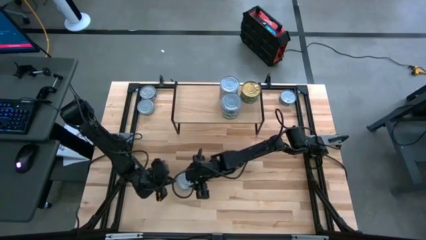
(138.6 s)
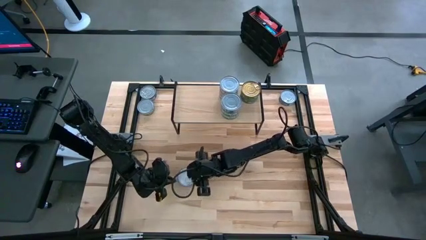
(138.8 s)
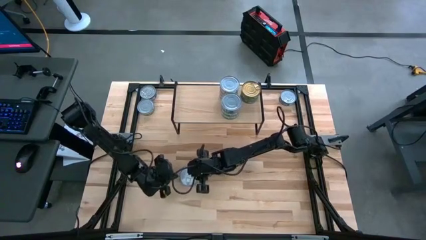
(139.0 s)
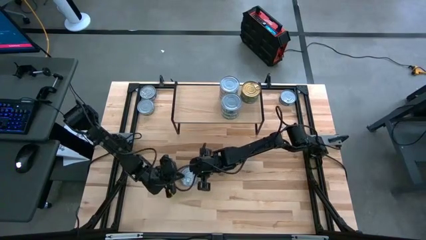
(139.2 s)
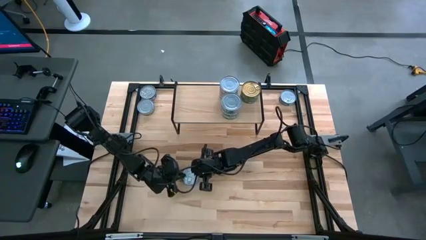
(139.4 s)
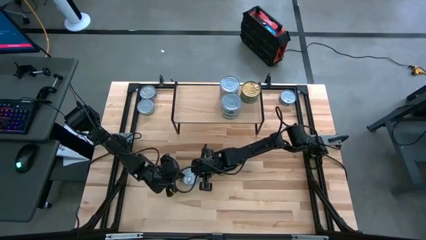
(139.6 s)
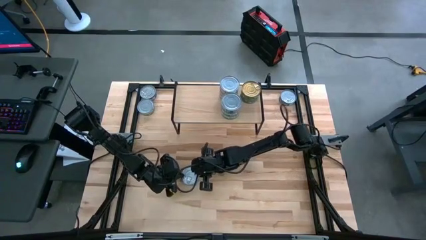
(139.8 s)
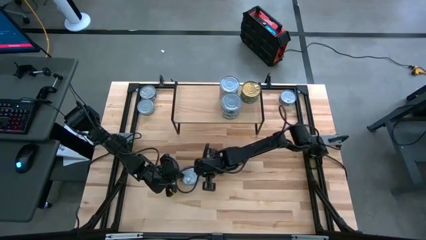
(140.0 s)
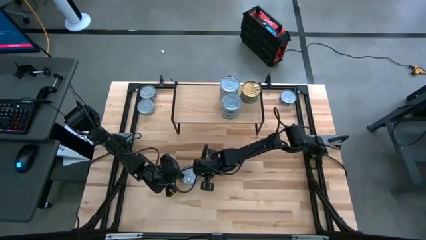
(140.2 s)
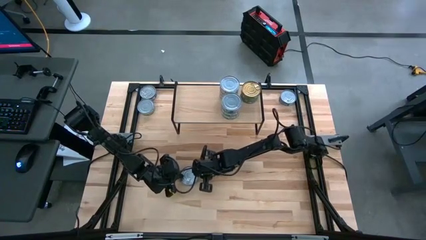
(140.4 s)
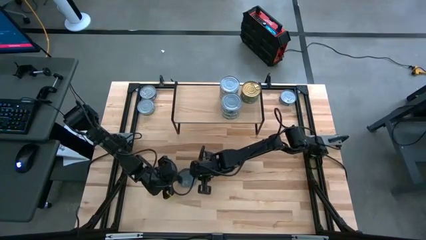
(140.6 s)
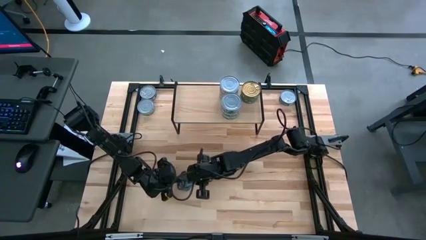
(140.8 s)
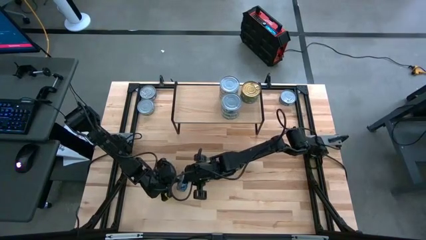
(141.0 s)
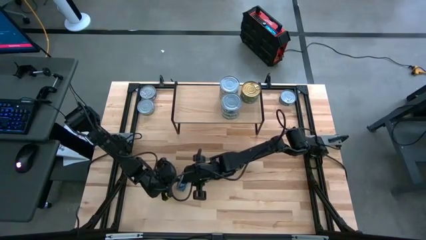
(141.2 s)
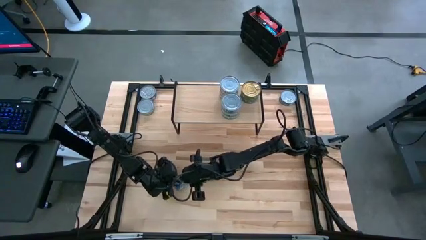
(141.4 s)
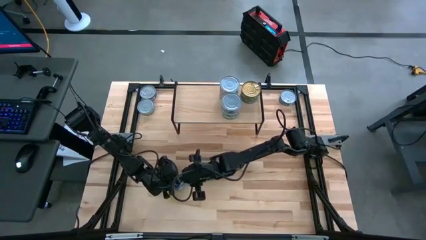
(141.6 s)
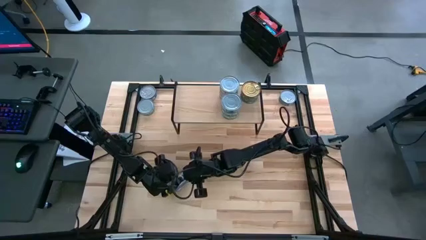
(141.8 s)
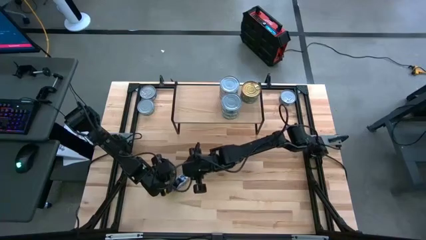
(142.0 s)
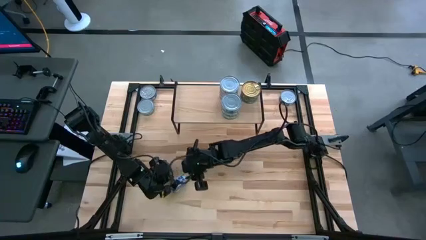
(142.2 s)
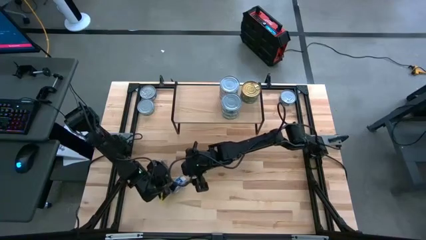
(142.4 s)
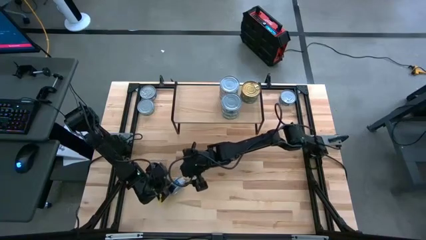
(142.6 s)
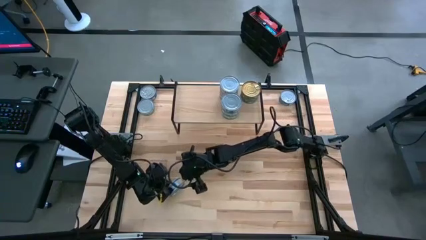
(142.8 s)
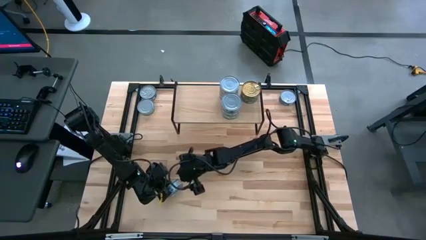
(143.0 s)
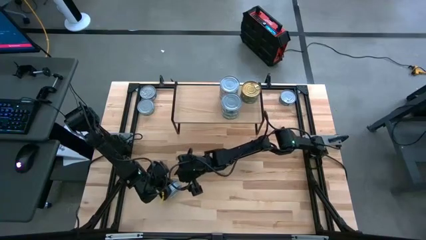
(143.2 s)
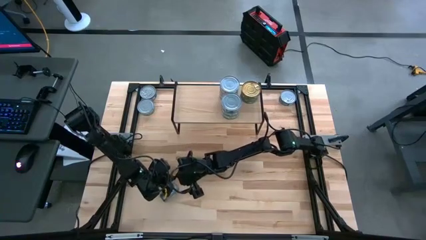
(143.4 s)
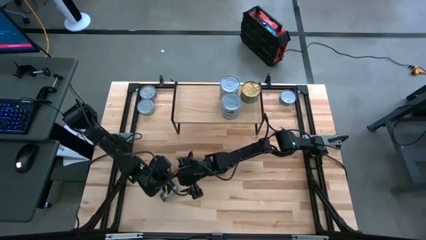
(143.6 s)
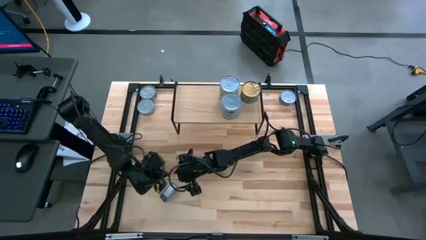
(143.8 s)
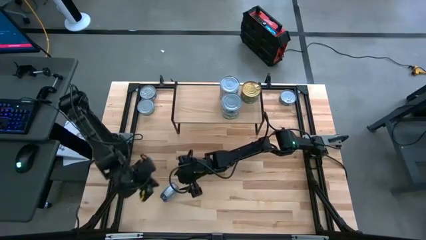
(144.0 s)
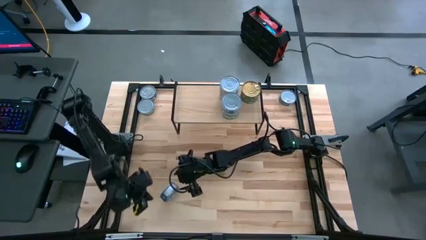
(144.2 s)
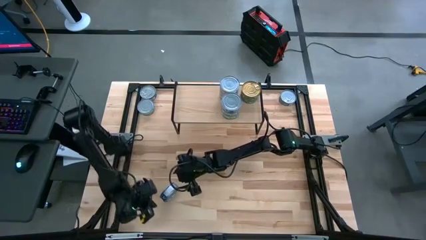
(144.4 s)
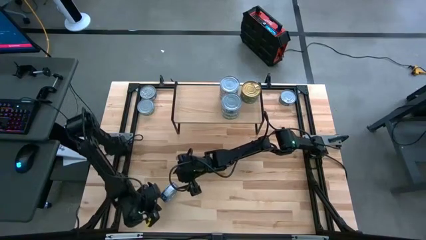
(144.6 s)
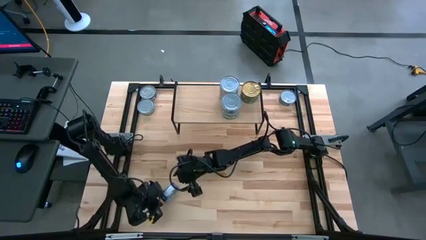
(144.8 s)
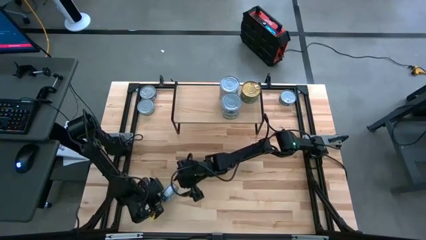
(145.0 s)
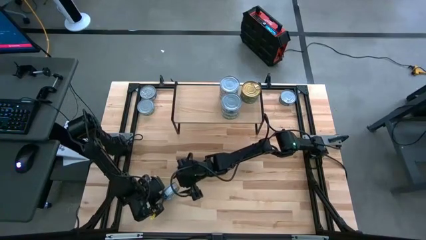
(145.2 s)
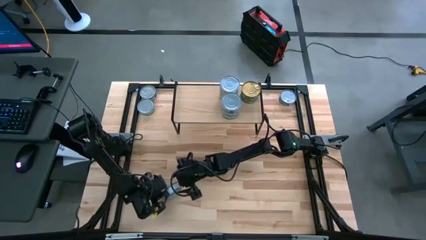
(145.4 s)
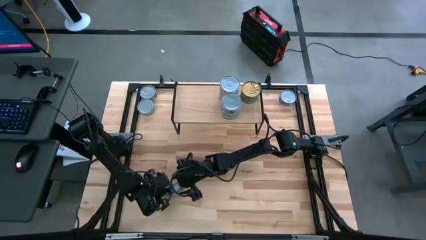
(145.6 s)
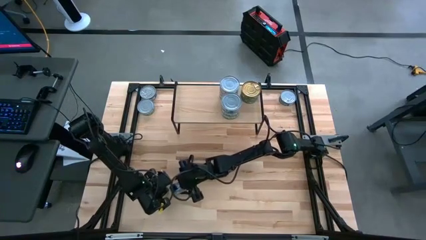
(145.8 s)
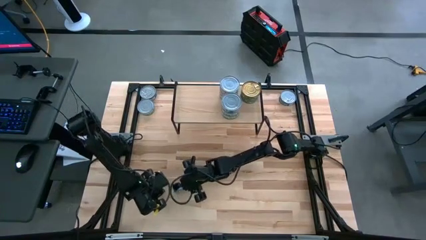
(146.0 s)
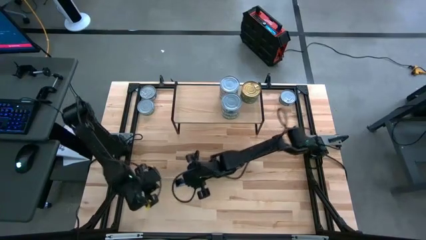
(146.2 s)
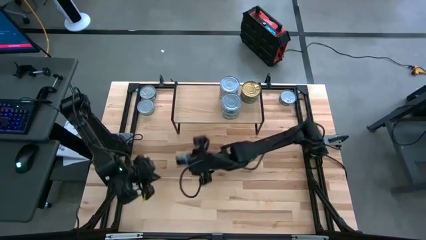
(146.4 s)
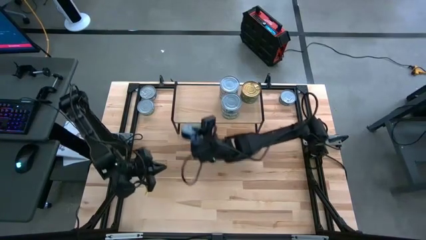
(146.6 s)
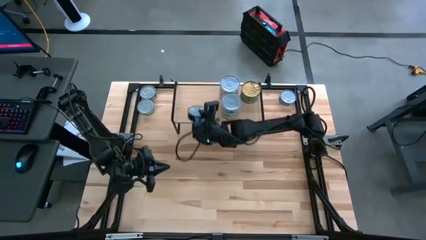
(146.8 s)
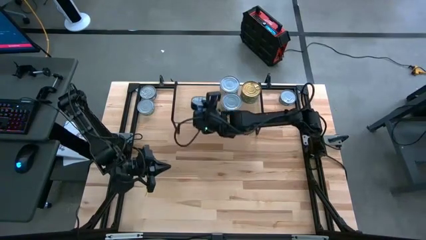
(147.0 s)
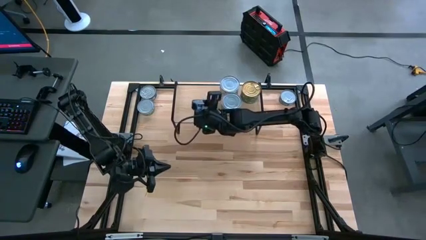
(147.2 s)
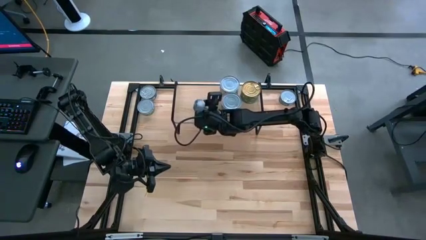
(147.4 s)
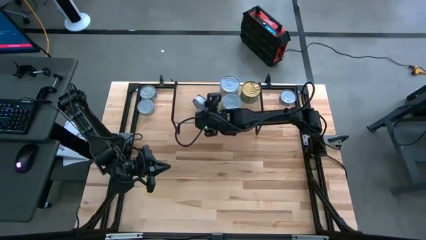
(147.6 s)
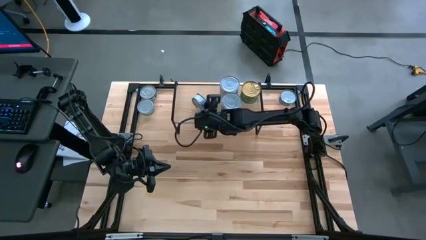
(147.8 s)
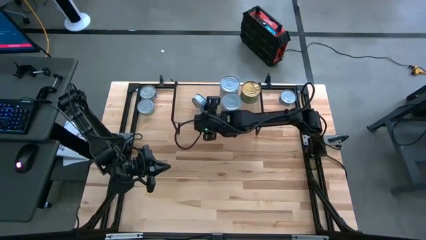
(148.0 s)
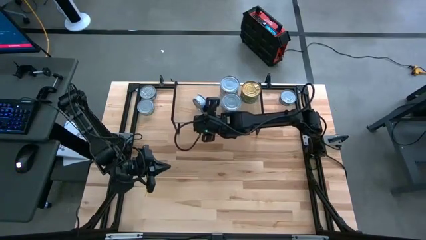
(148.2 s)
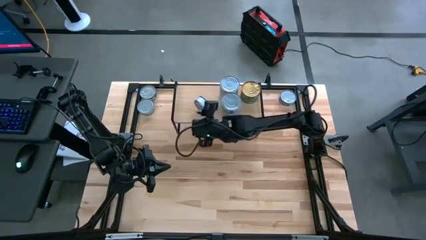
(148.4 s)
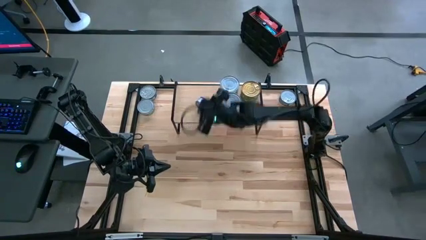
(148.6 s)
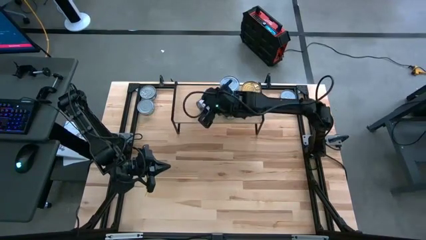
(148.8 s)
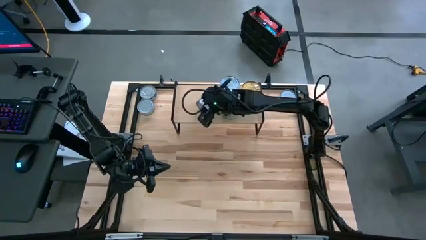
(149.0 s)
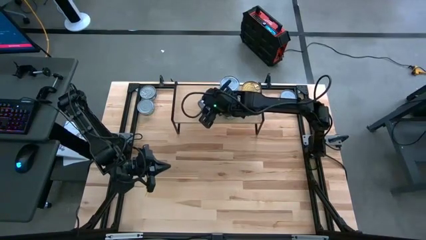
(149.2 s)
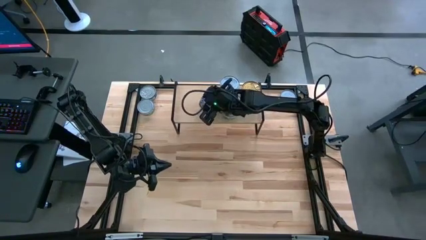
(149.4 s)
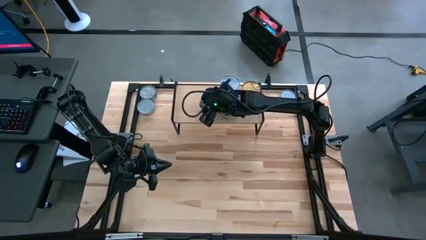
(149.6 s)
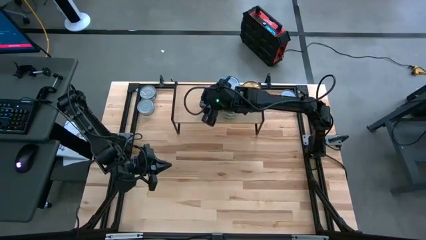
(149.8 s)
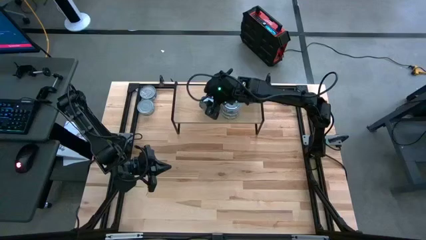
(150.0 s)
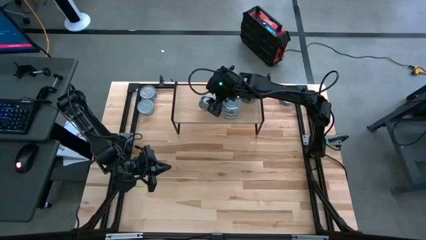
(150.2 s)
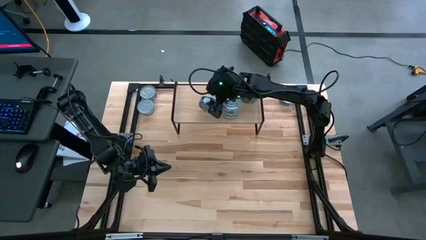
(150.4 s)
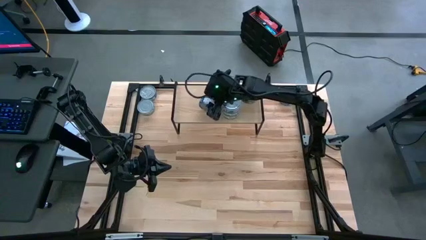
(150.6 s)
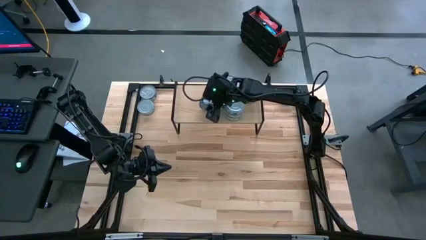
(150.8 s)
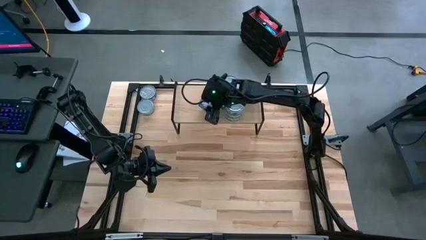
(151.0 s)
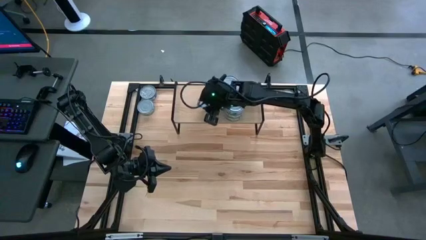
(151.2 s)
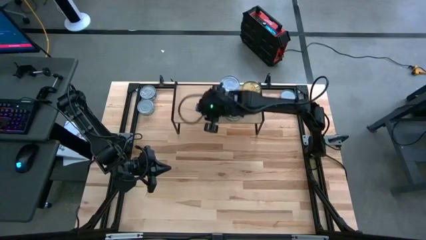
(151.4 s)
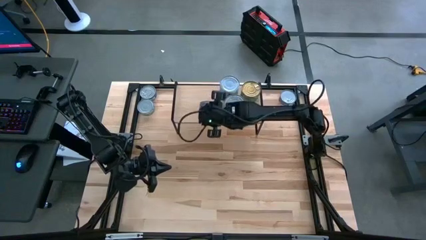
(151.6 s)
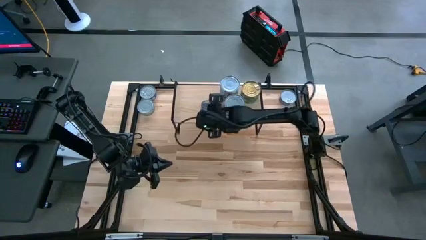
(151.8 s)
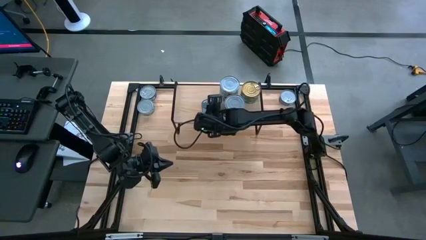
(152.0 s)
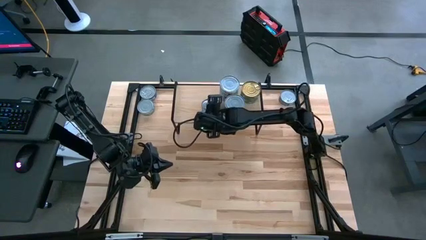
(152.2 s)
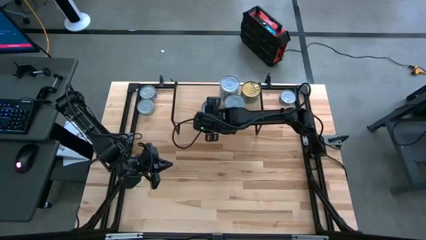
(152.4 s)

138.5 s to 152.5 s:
Task: Stack canned seafood by type on shelf
Put the blue tuna can on the shelf

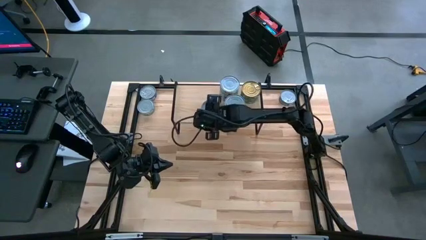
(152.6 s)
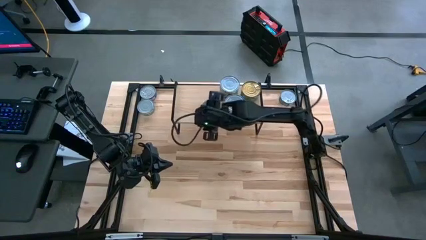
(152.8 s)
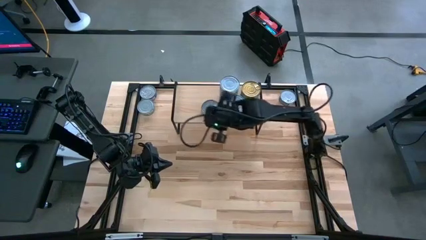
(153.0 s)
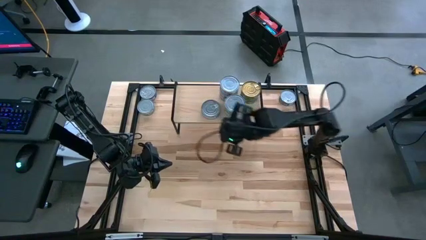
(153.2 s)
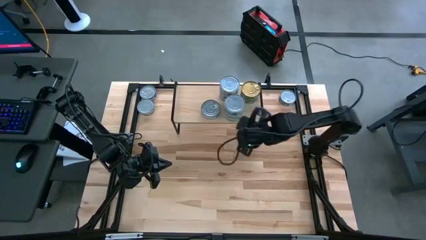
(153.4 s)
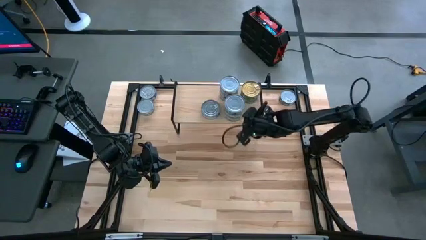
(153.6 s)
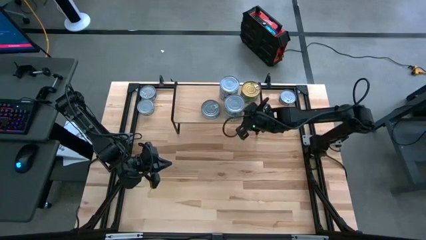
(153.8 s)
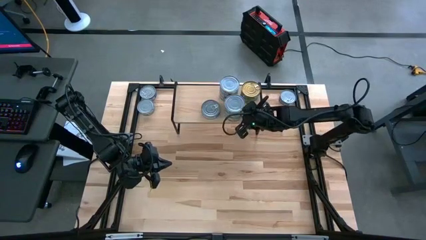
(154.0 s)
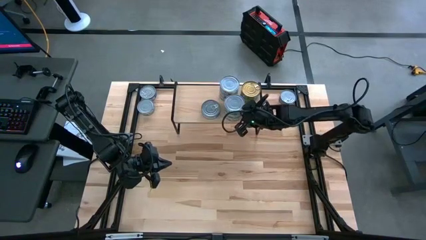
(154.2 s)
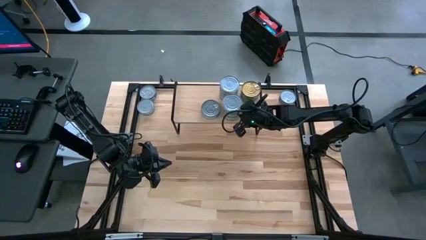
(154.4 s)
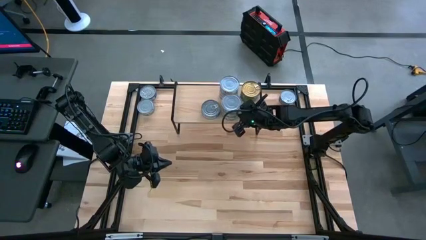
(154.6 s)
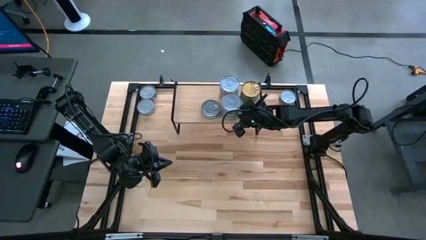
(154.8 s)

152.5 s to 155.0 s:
Adjust the light green tuna cans on the shelf

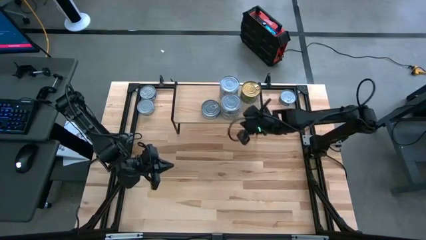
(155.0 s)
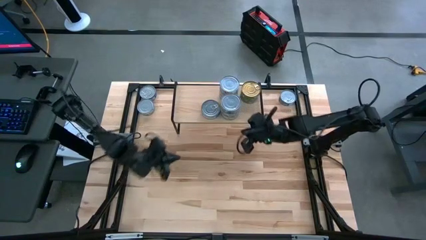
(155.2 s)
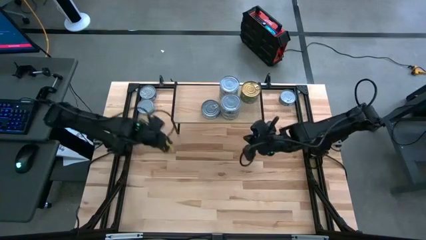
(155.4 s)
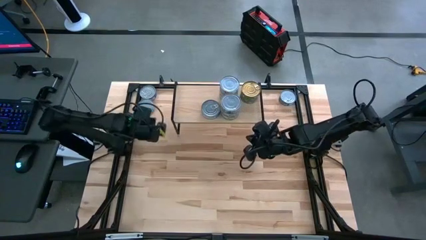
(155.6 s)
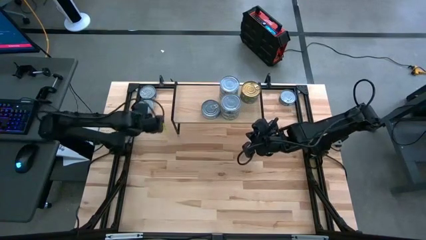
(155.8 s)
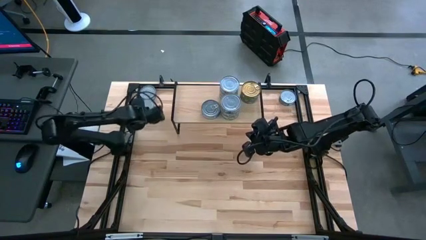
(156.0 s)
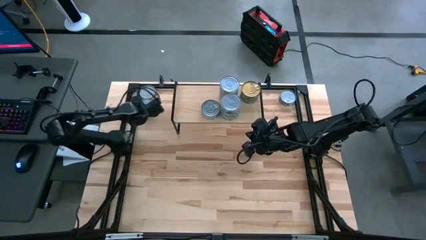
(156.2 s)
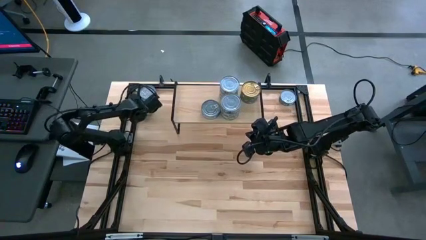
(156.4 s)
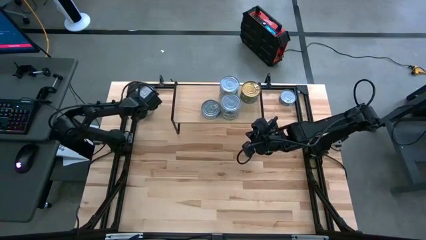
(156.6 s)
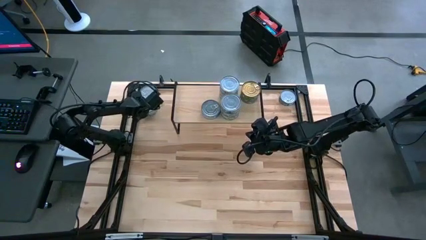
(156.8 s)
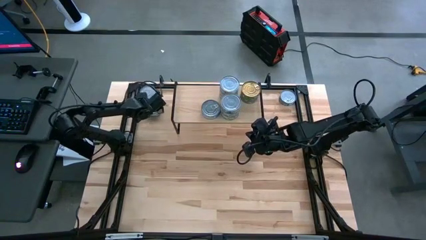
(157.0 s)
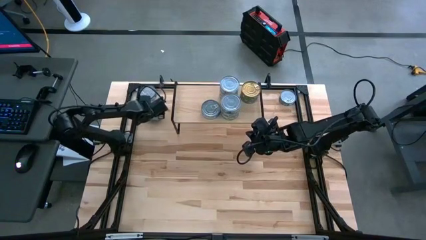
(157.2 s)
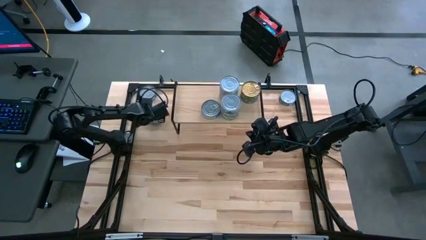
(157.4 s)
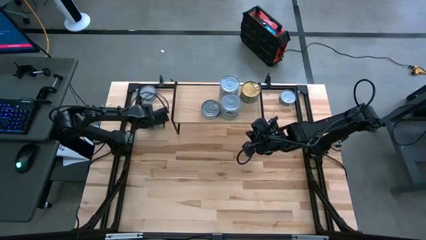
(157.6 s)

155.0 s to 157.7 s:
Stack the light green tuna can on top of the other light green tuna can on the shelf
